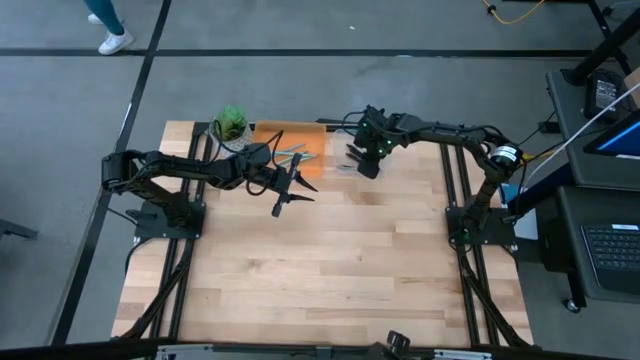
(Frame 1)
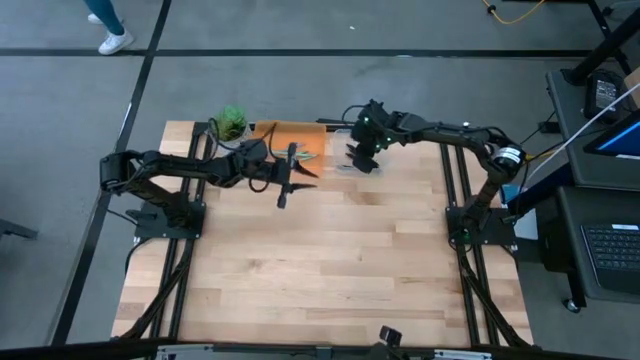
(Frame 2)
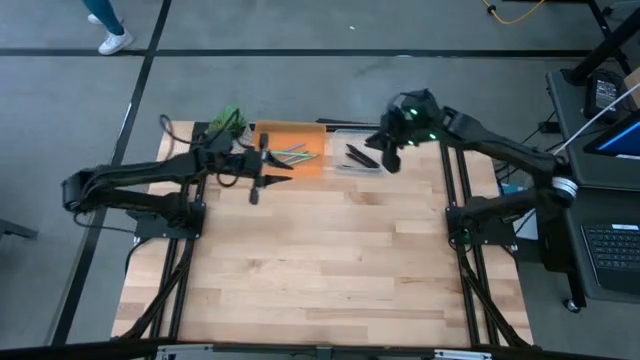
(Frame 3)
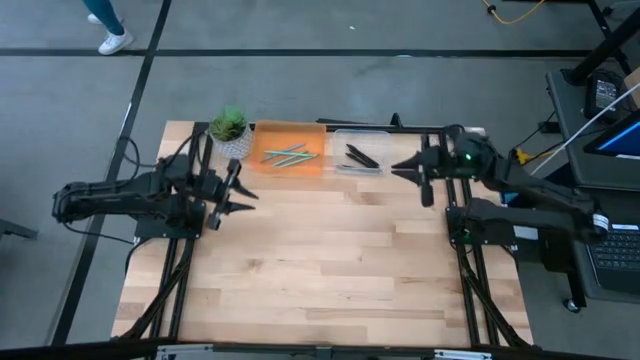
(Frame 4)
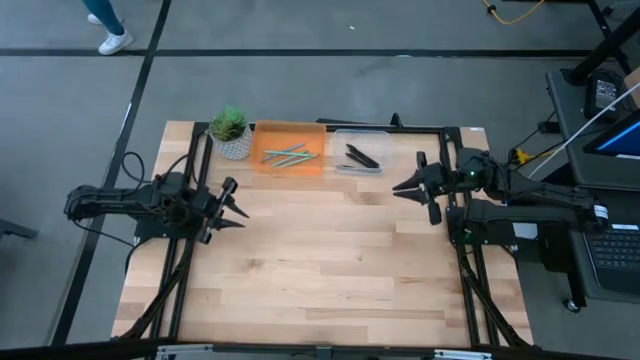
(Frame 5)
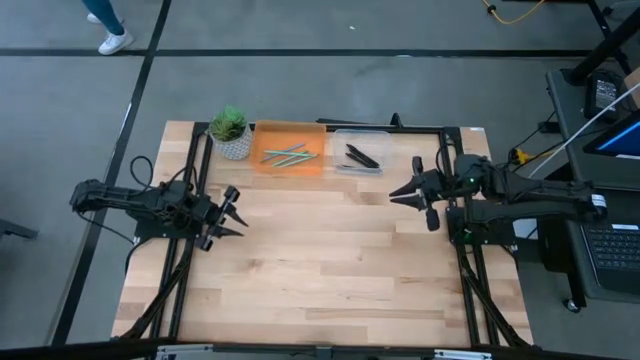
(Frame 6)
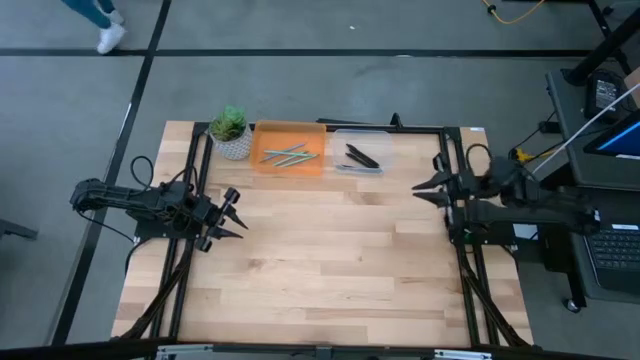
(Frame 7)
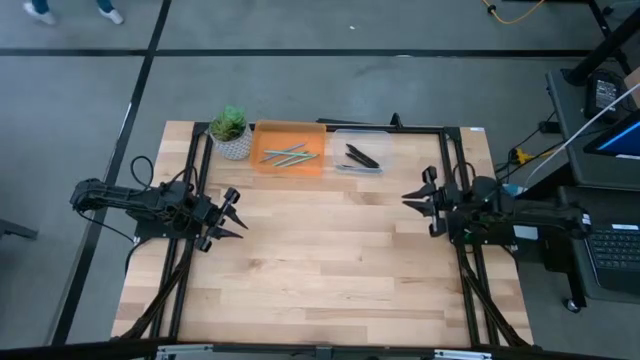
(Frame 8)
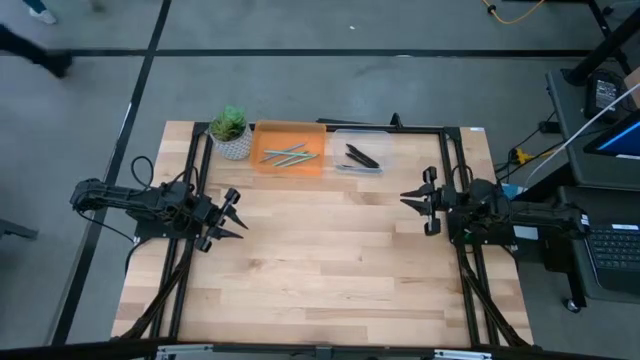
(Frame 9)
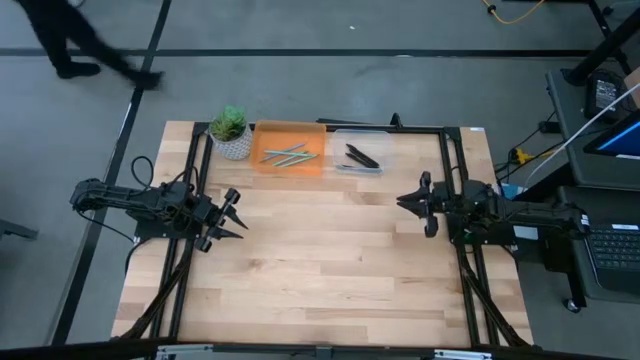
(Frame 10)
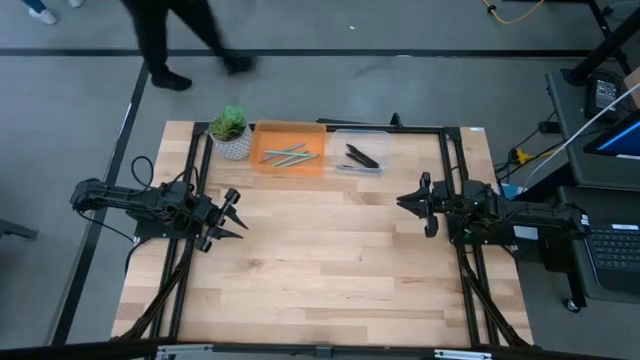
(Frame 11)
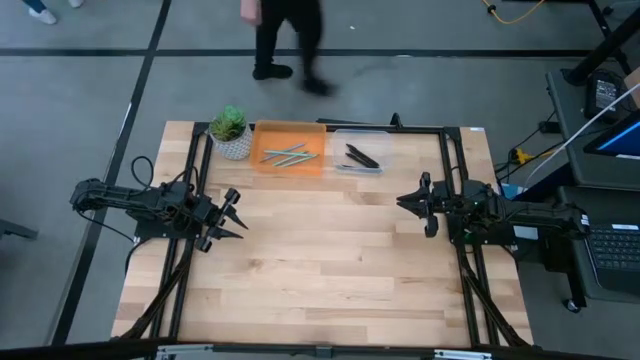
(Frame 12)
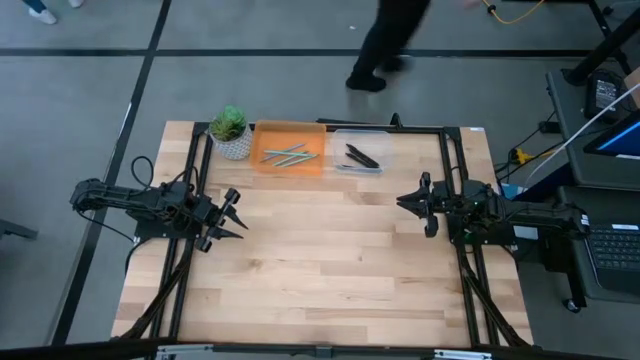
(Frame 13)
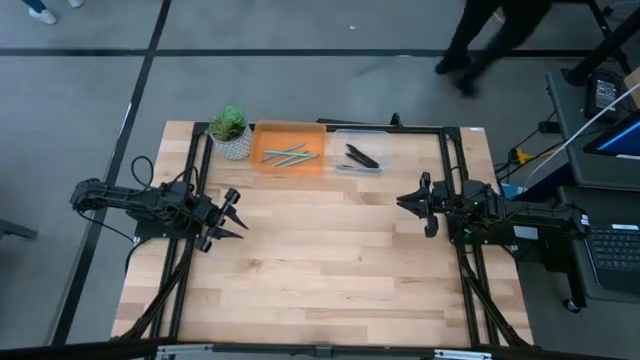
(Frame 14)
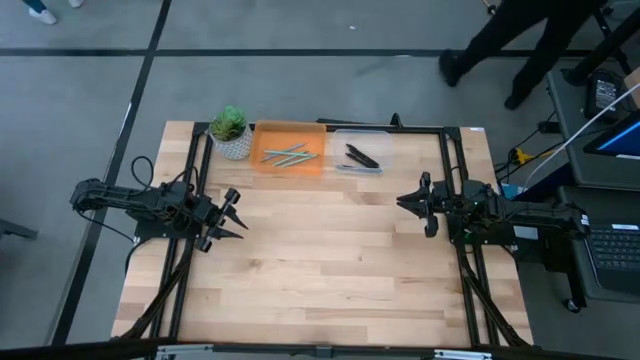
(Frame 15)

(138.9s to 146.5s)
Task: Sort pens & pencils
Return to Home Position

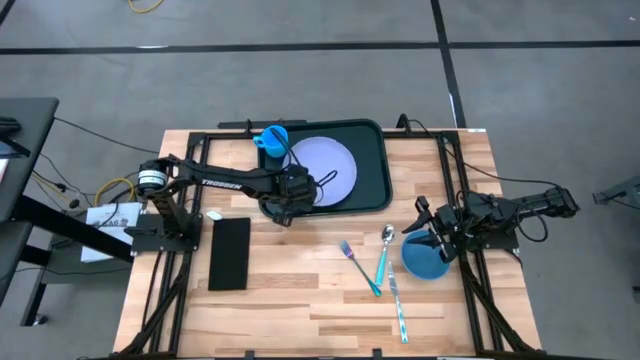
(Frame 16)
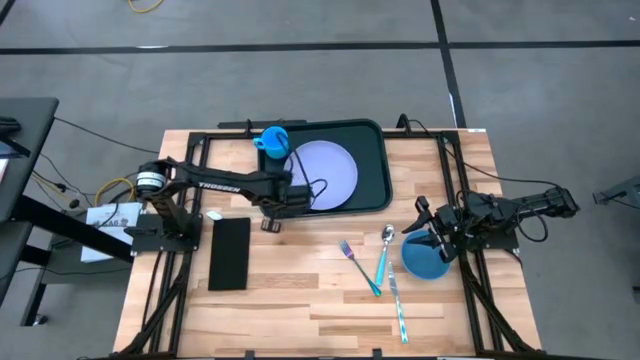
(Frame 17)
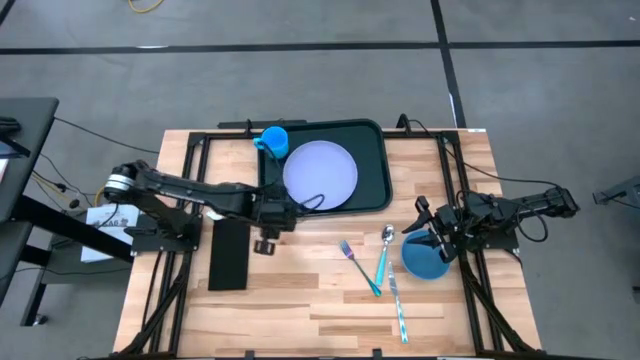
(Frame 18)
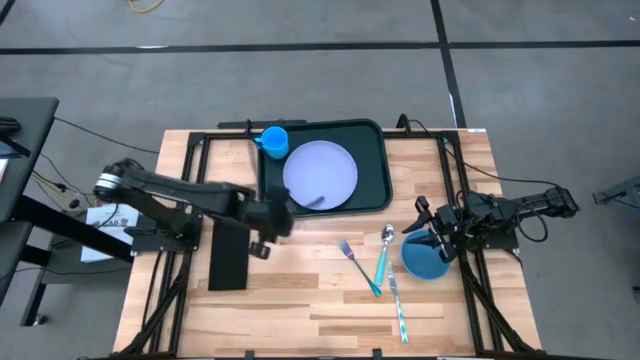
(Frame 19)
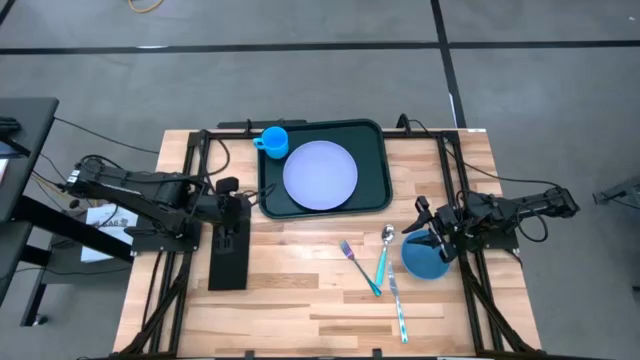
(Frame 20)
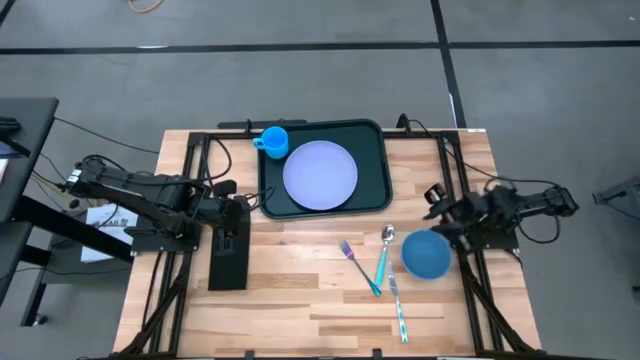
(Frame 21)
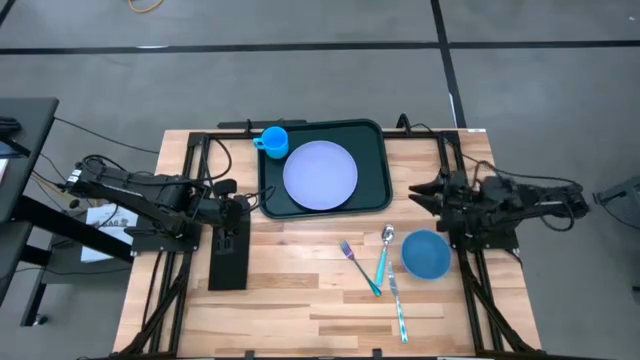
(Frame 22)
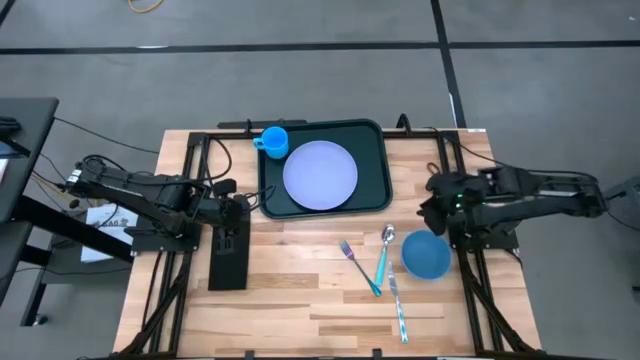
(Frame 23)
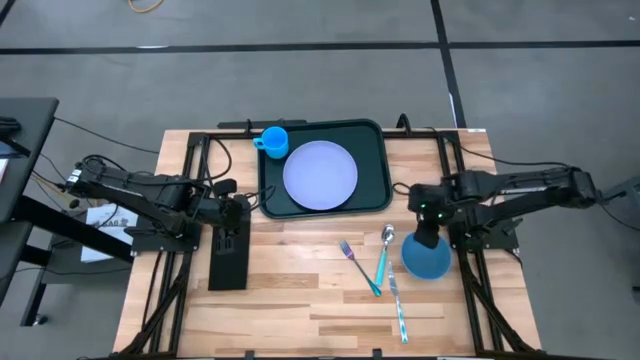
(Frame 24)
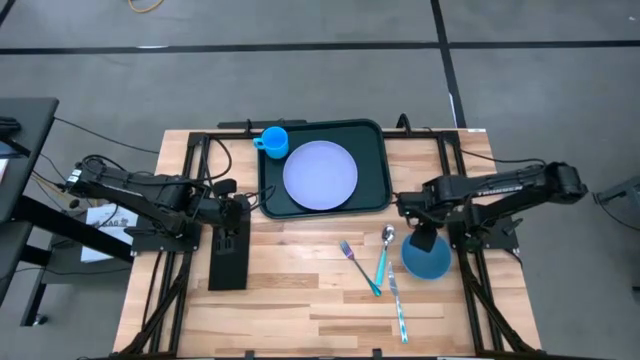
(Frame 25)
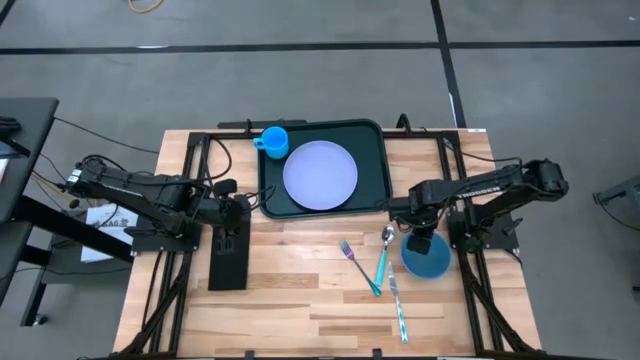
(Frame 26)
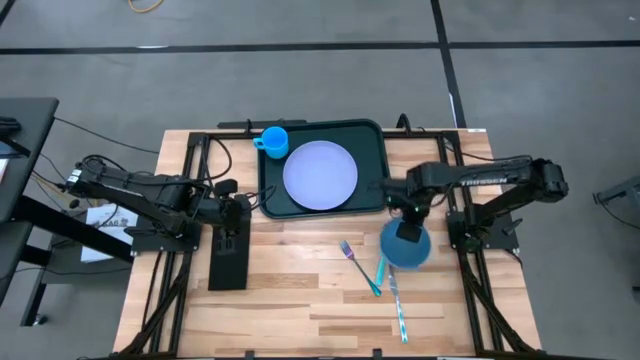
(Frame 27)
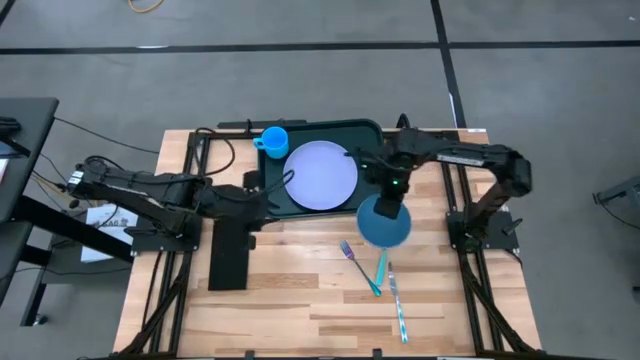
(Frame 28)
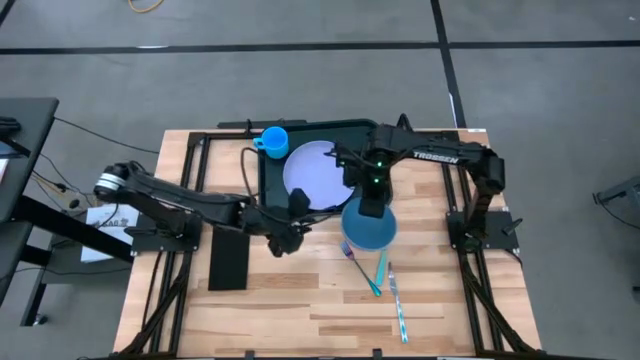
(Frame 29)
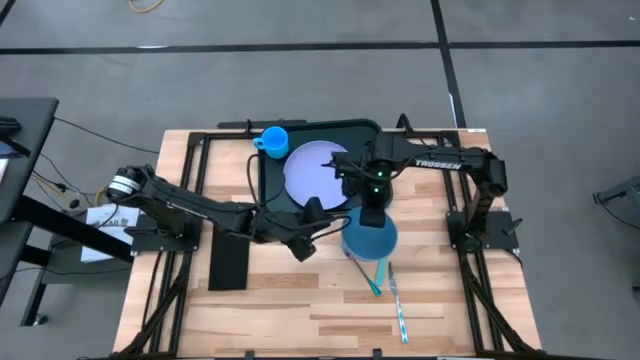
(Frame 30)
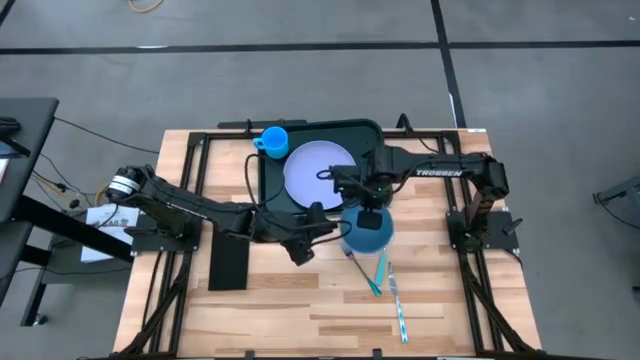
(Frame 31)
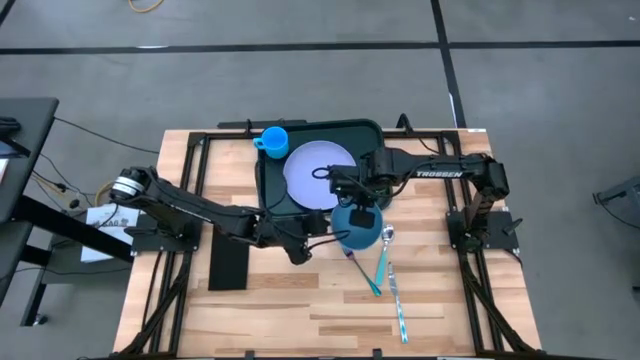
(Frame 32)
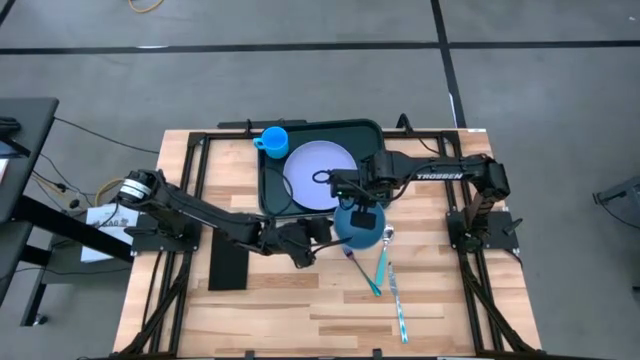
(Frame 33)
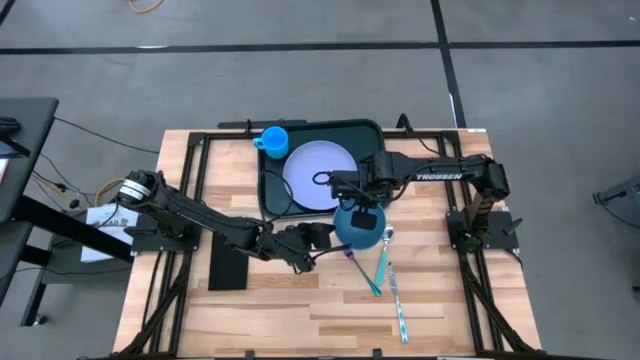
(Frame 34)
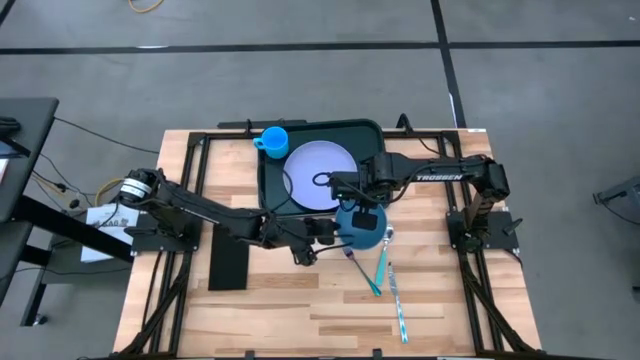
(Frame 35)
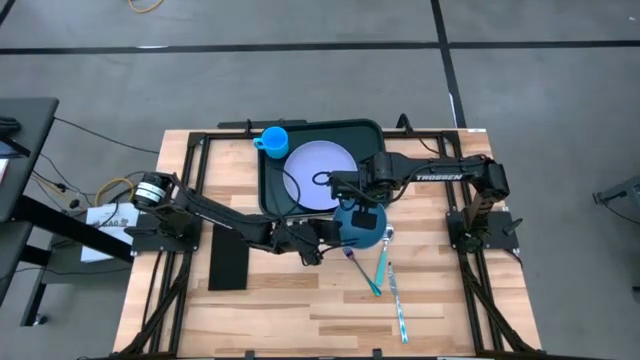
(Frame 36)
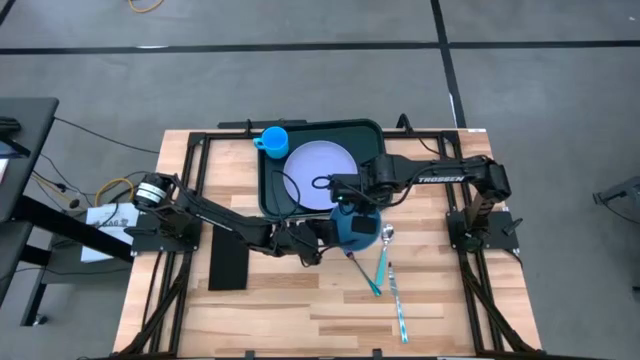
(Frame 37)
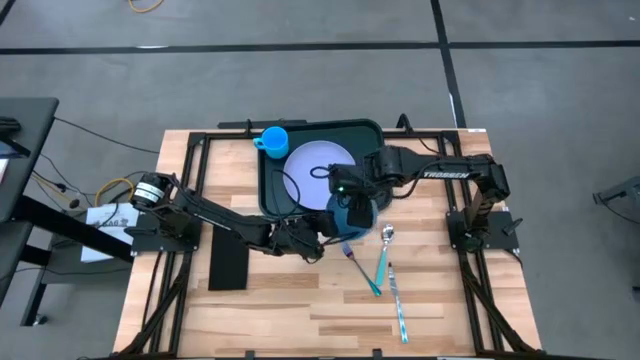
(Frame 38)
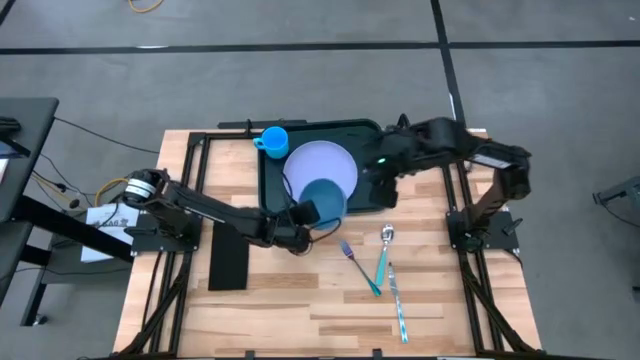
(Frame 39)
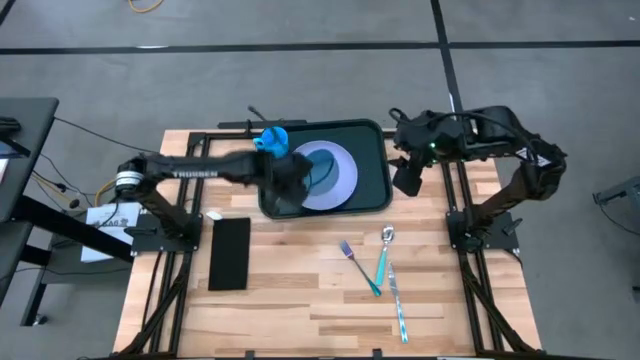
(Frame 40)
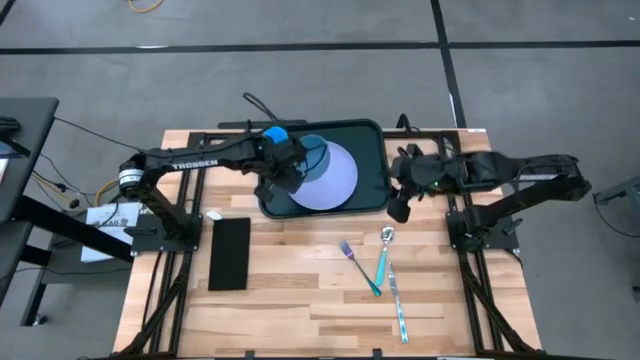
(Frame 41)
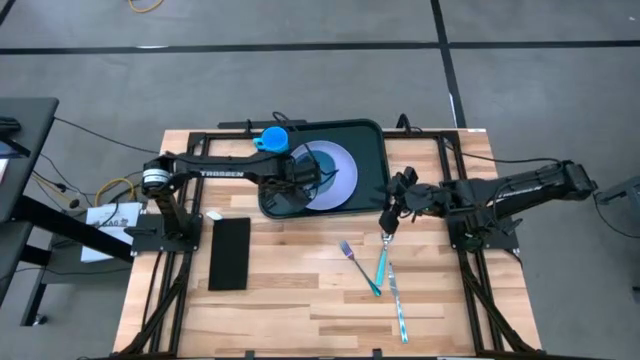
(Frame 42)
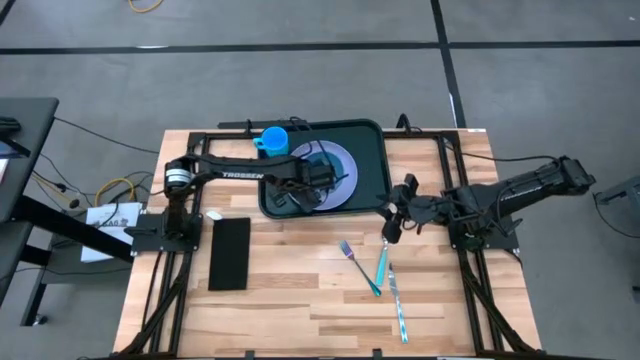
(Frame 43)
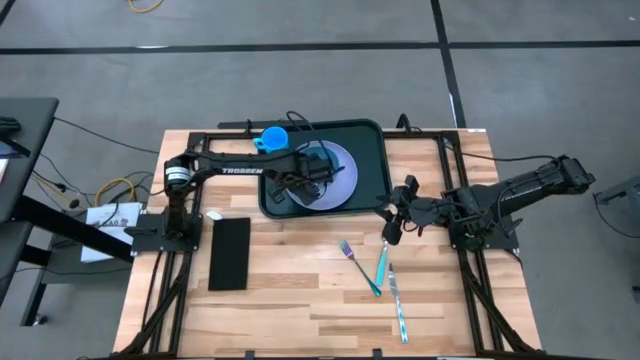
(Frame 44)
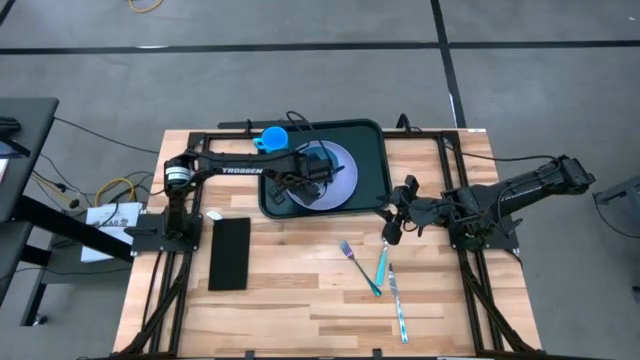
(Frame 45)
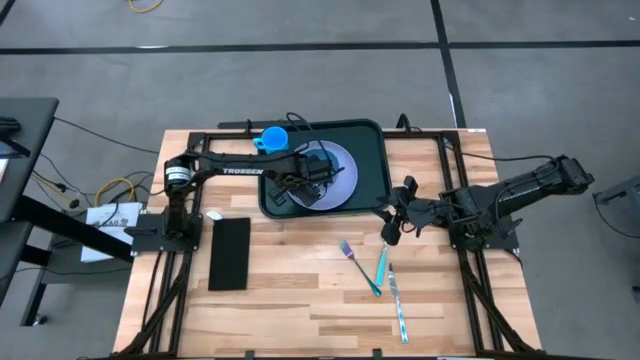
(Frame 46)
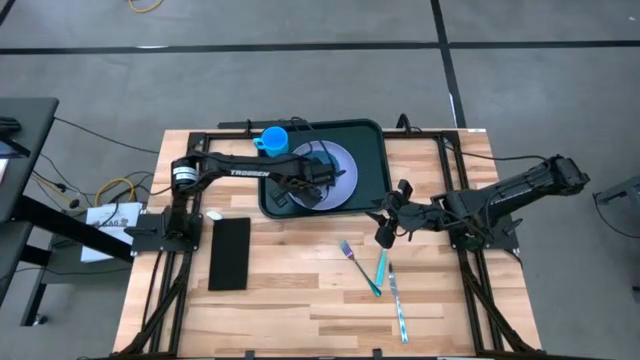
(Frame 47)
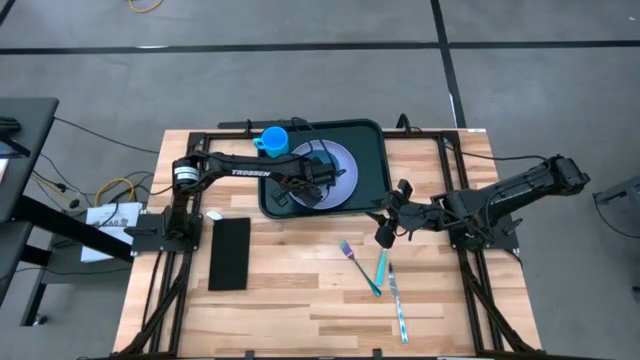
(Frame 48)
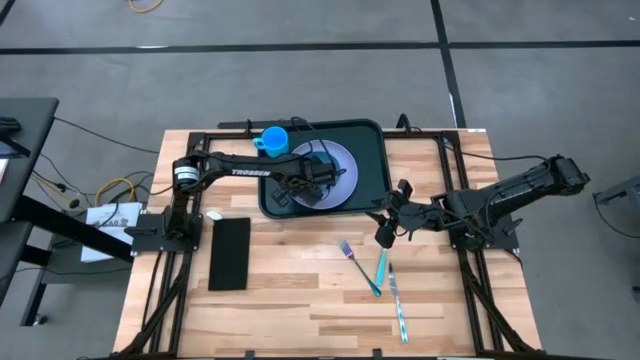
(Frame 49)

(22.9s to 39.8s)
Task: Set up tray
Put the blue bowl on top of the purple plate on the black tray
